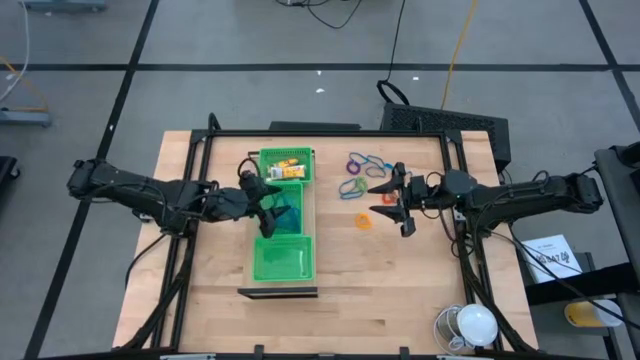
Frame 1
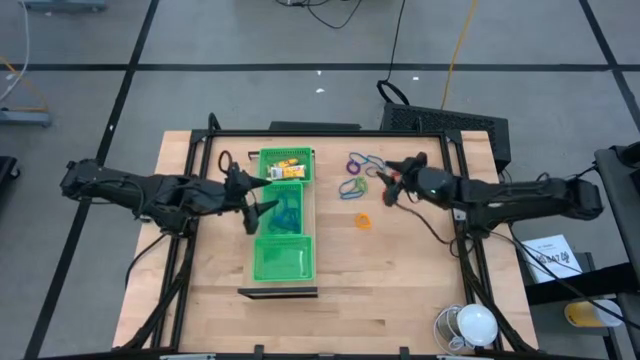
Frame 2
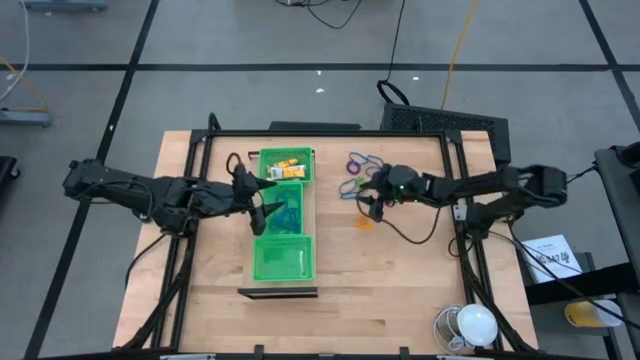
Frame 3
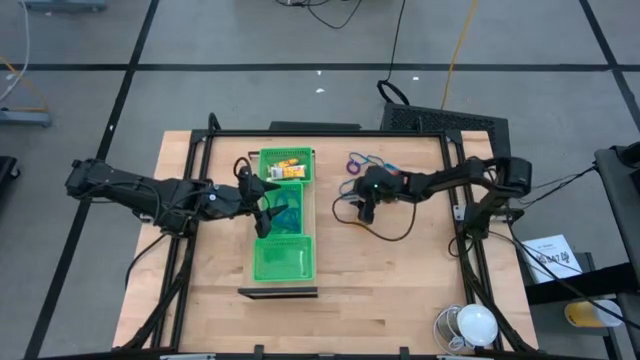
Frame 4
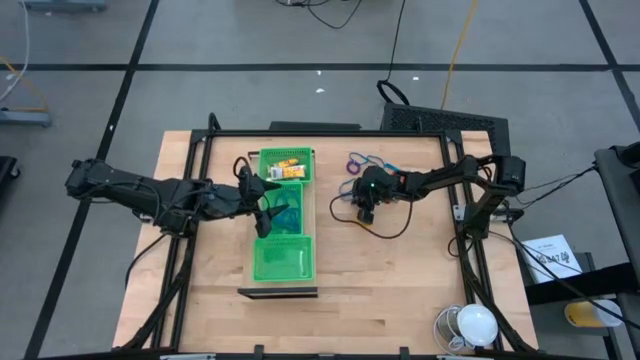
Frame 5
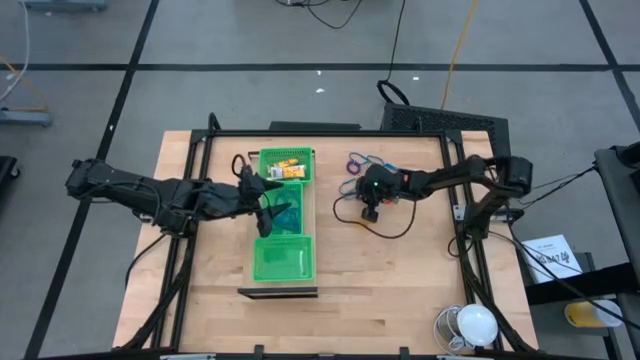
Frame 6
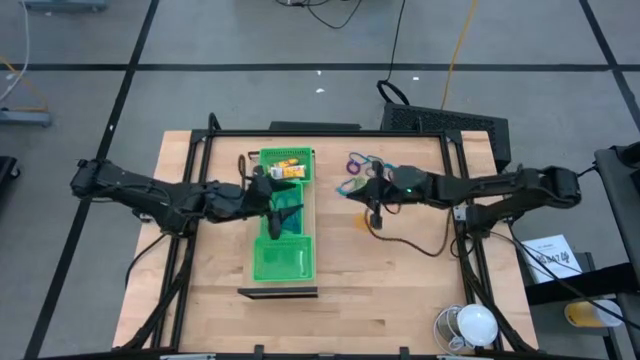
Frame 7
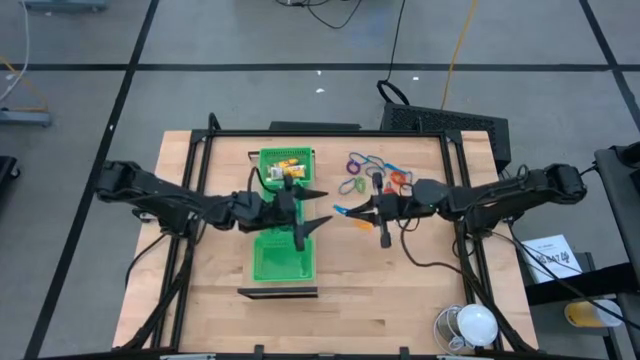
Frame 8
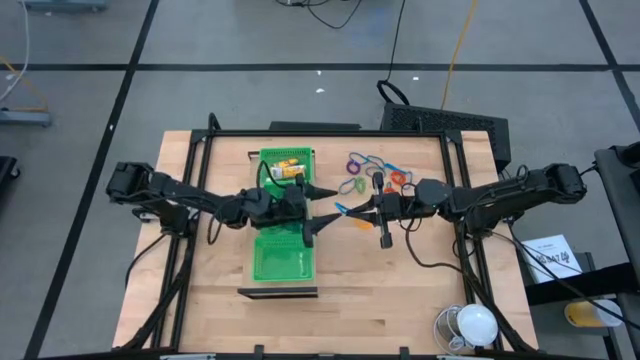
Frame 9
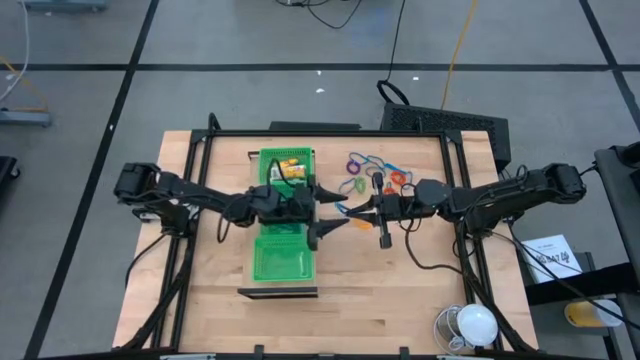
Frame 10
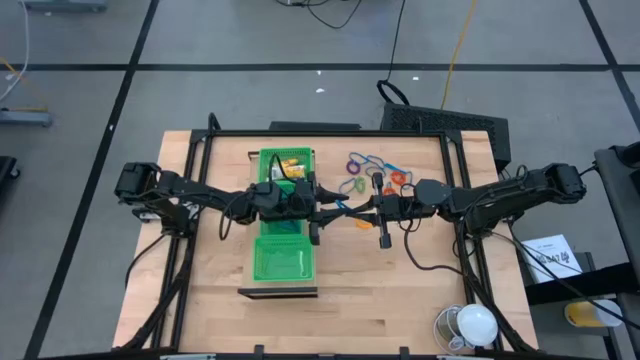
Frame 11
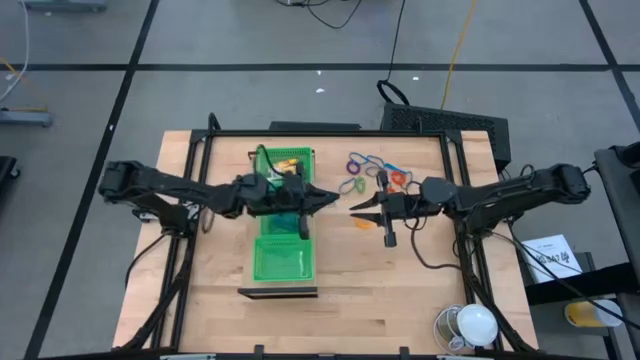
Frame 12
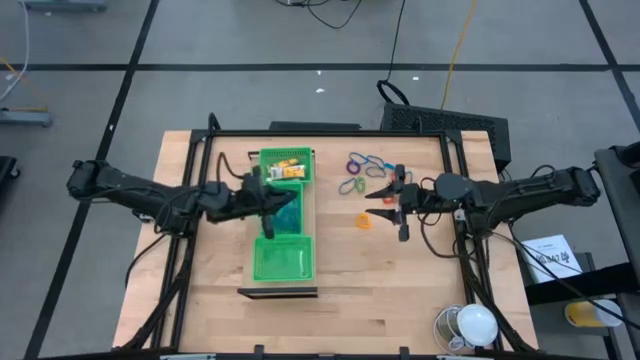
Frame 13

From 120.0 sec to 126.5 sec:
Task: Pick & Place Office Desk Supplies
Put the blue rubber band into the center green bin on the shelf

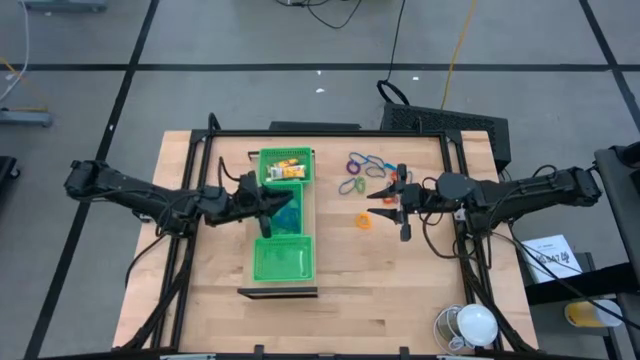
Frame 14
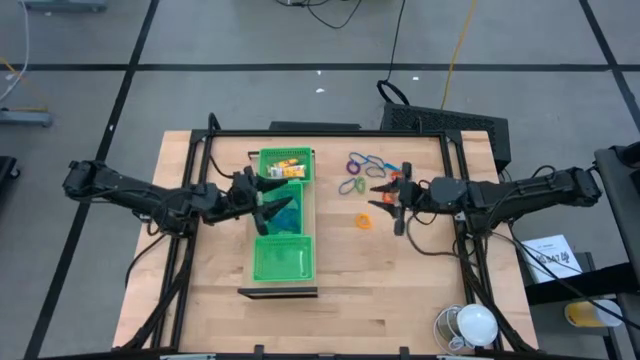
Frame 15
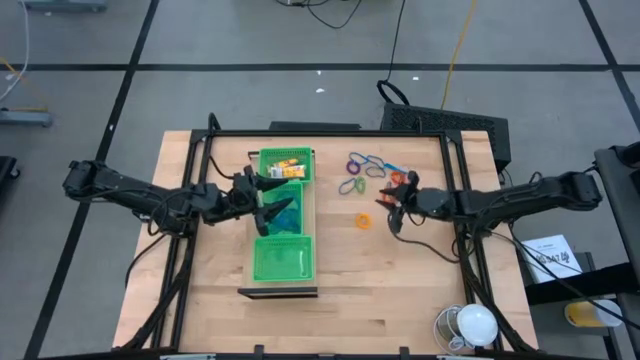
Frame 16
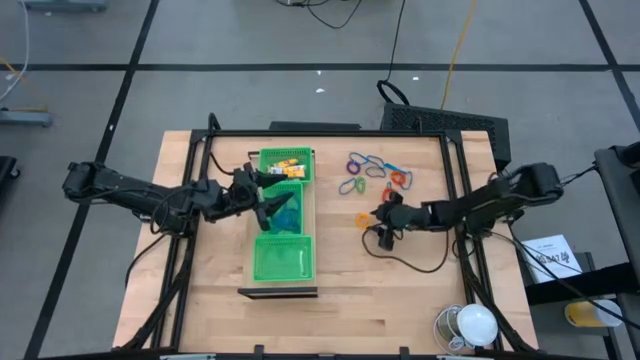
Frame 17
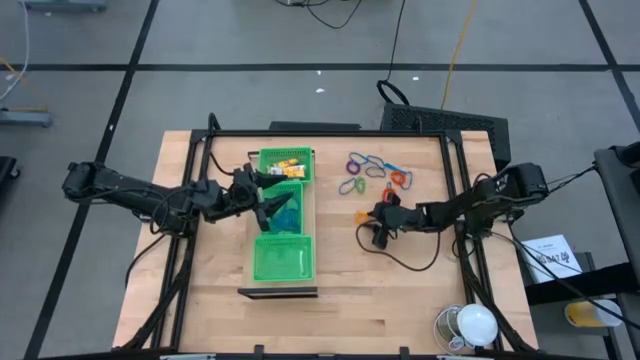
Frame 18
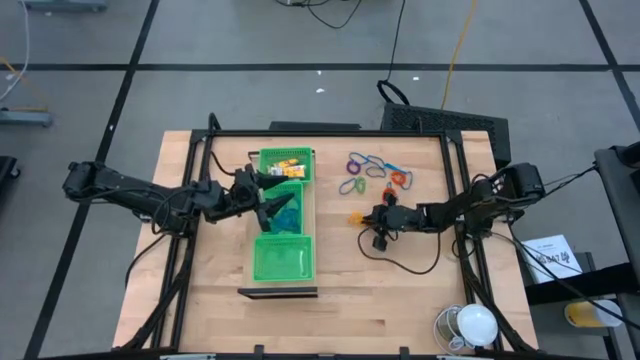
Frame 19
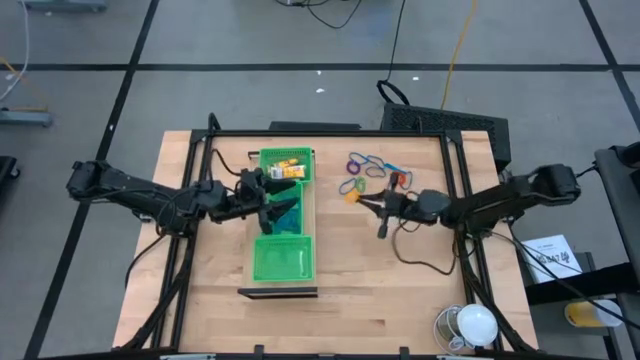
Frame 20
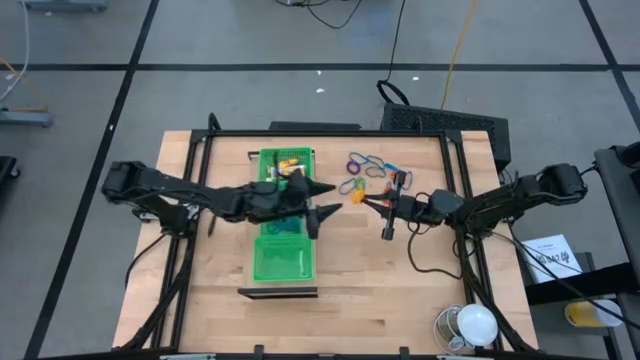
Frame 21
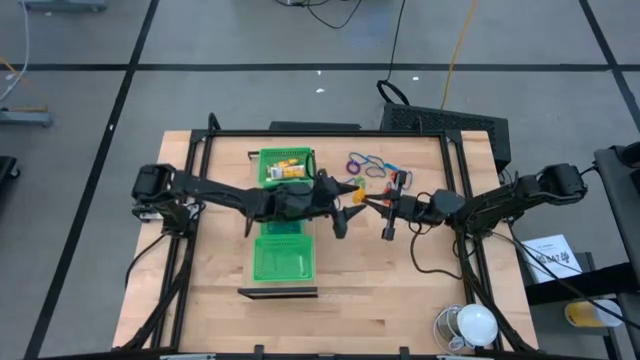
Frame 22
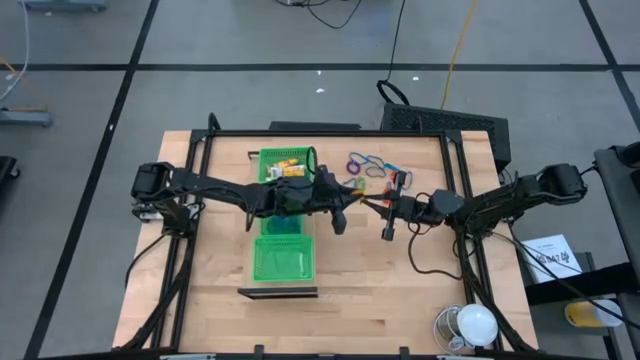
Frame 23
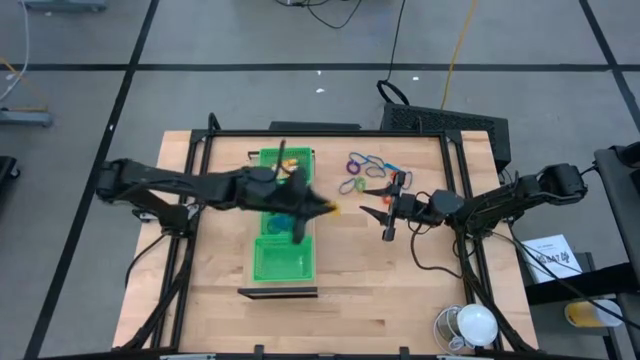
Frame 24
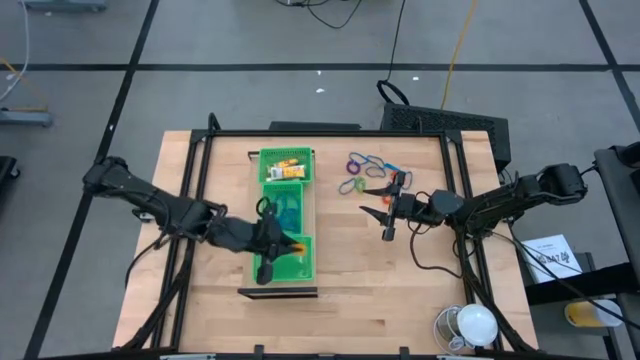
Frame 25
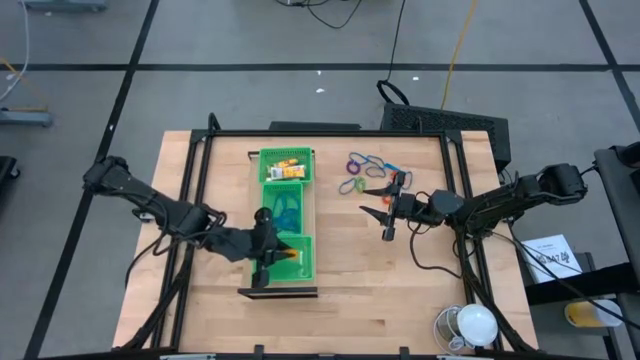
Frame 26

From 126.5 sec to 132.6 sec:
Put the yellow spring rubber band into the bottom green bin on the shelf

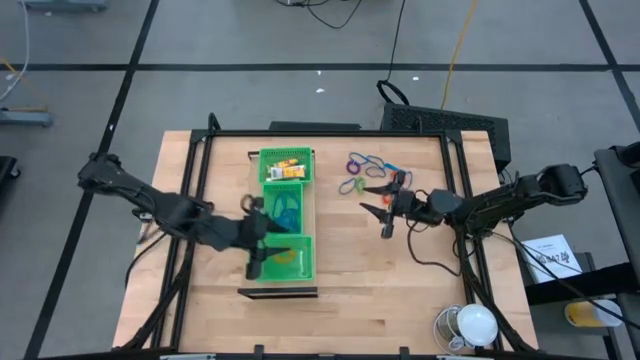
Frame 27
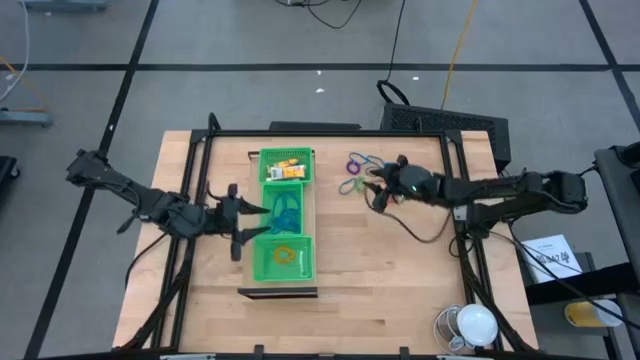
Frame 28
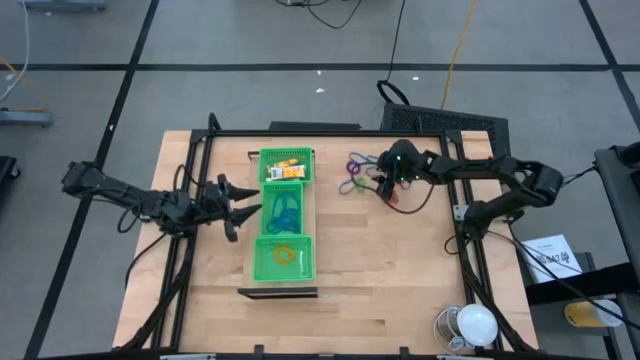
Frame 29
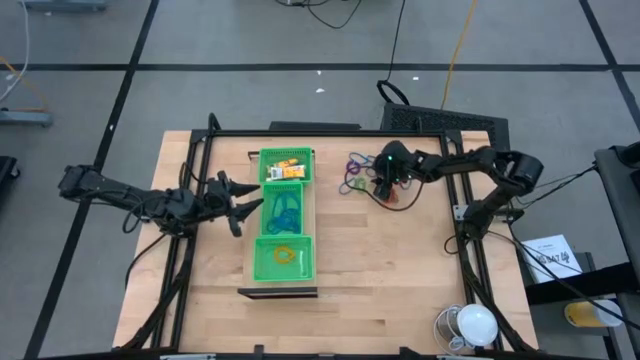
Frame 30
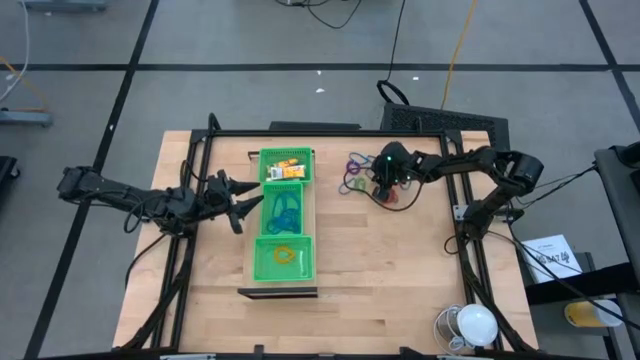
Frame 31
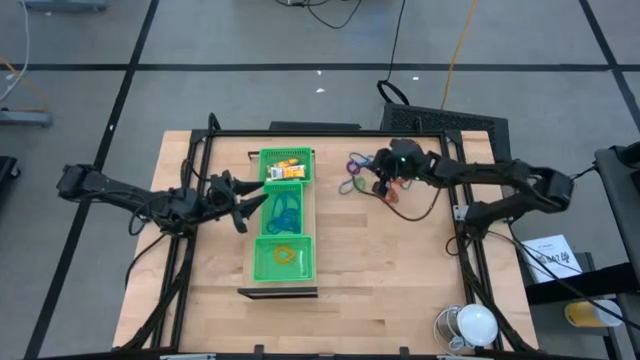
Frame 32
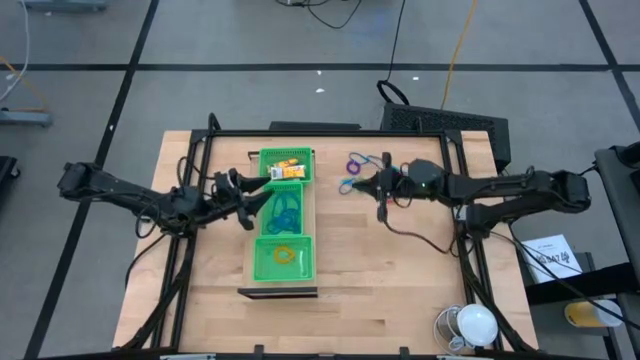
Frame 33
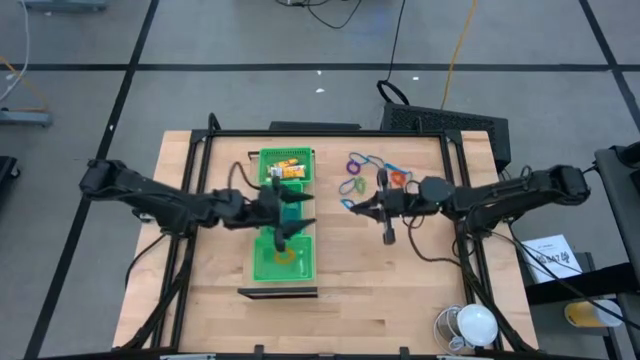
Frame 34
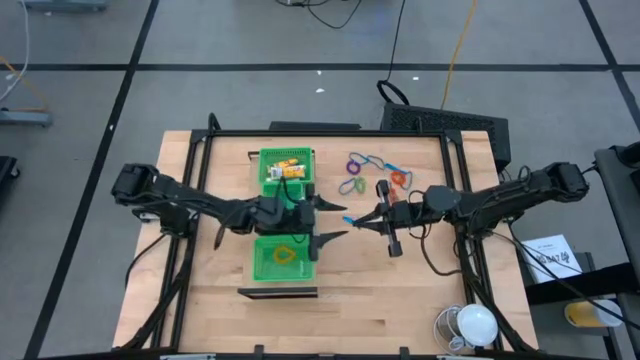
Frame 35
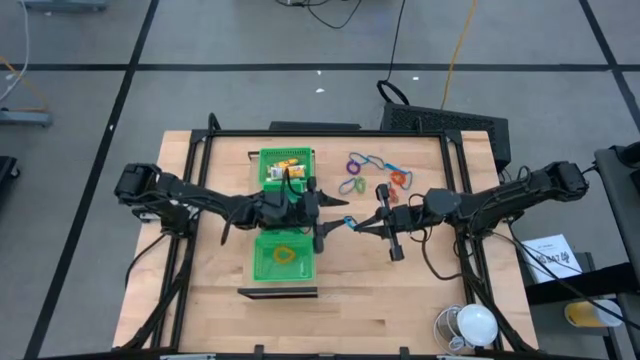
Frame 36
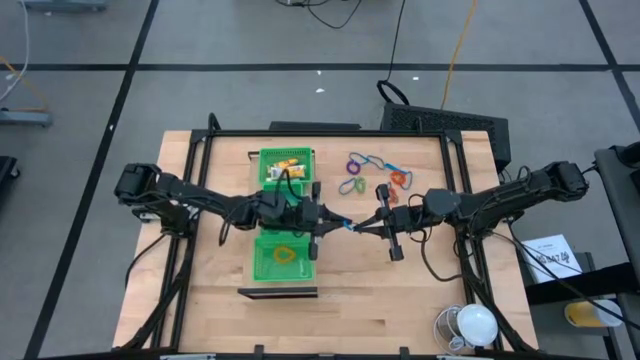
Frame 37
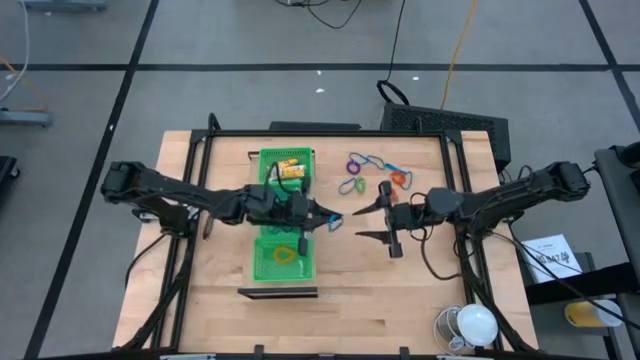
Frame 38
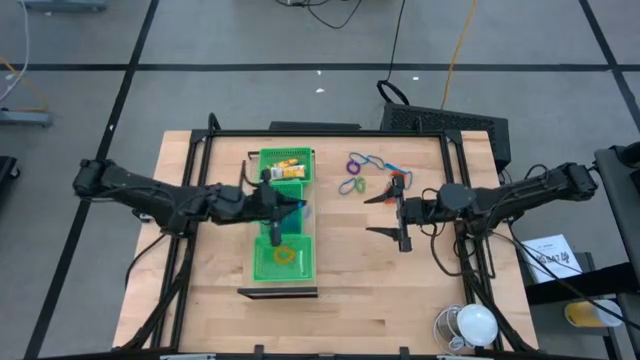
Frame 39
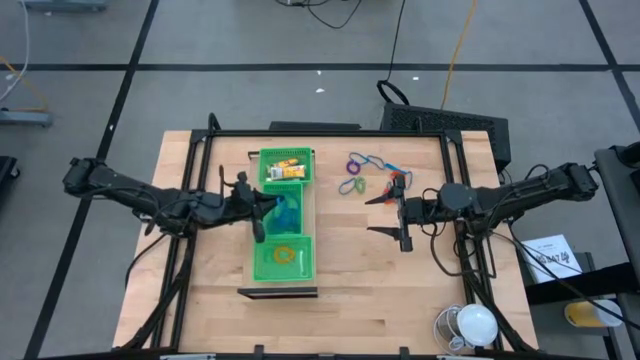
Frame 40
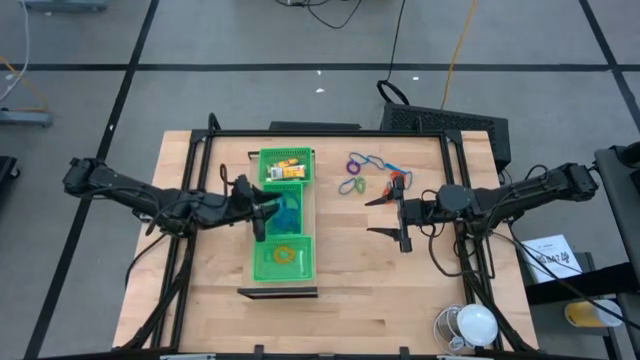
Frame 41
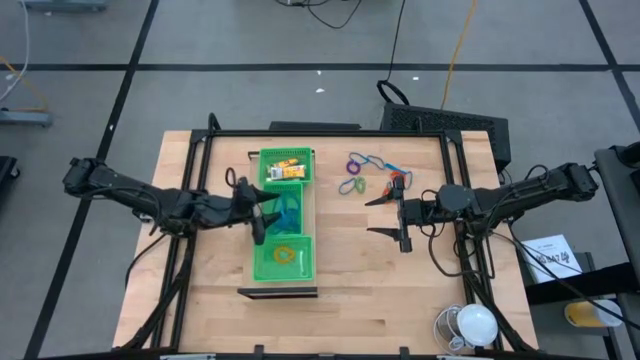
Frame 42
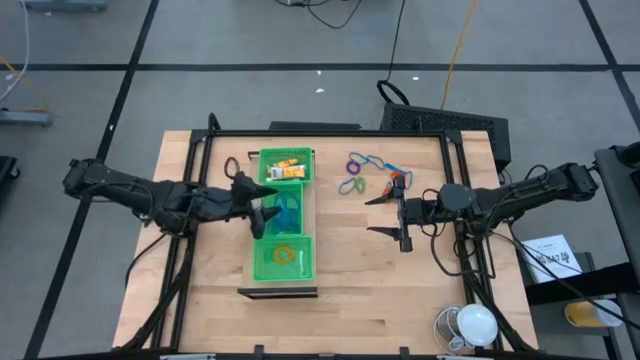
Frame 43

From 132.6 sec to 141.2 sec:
Put the blue rubber band into the center green bin on the shelf
